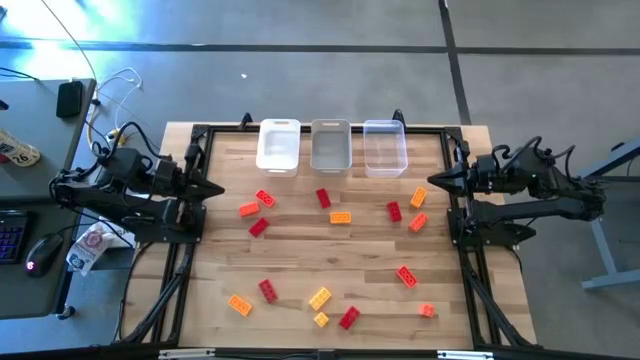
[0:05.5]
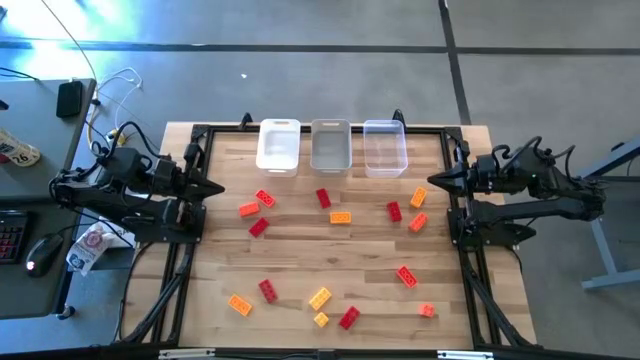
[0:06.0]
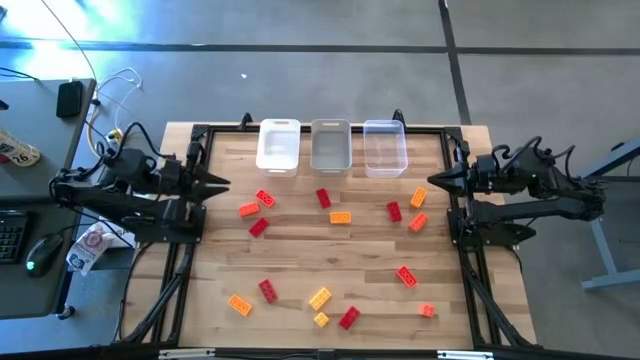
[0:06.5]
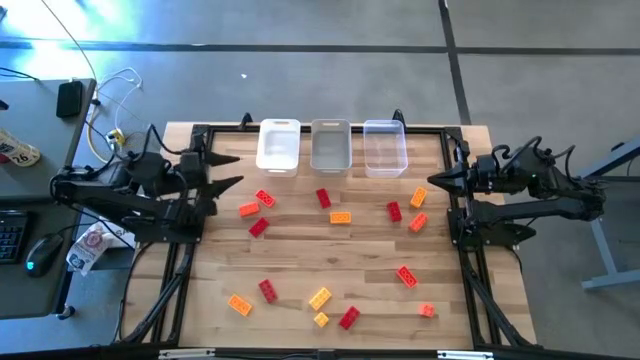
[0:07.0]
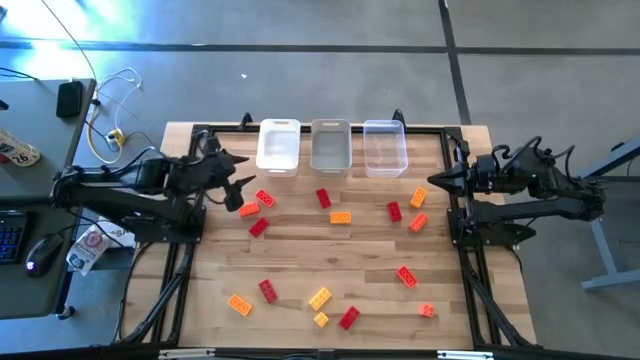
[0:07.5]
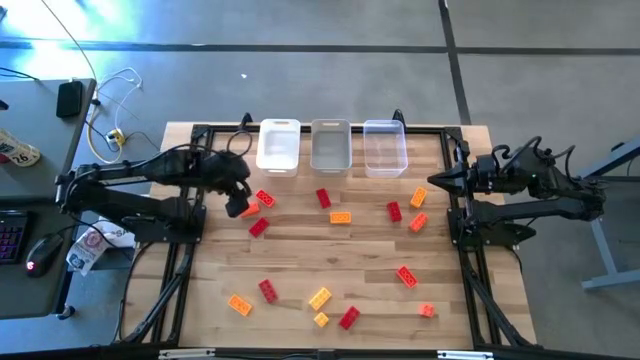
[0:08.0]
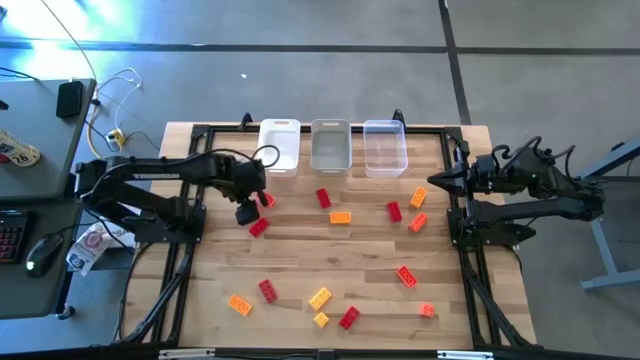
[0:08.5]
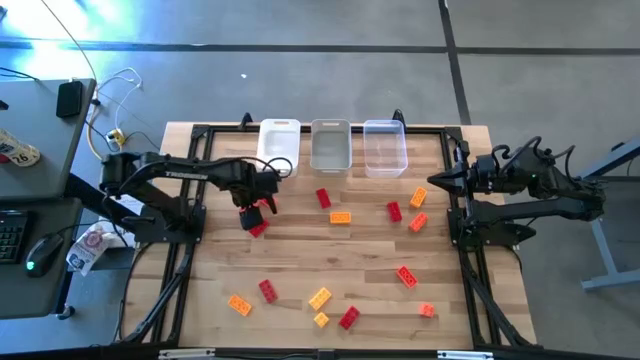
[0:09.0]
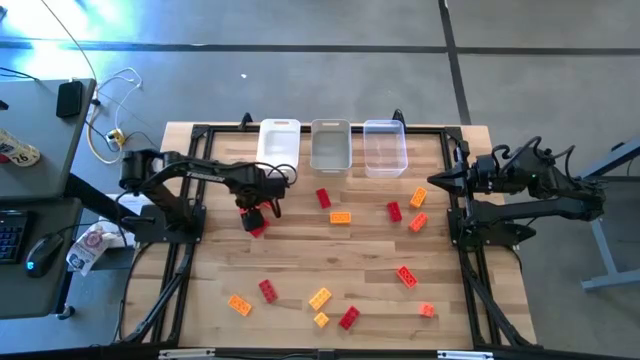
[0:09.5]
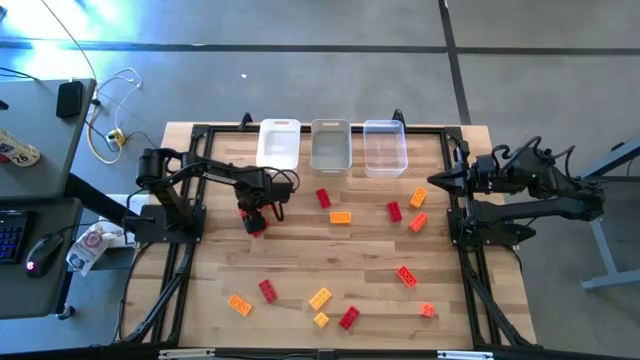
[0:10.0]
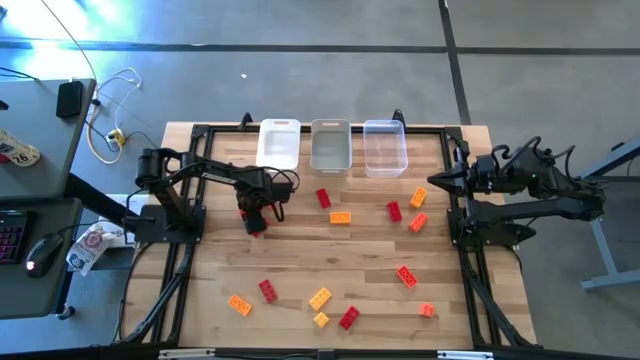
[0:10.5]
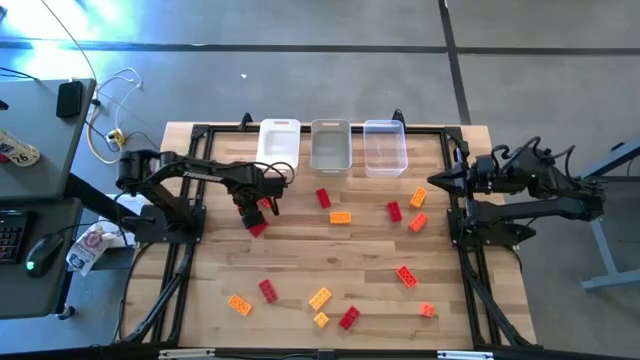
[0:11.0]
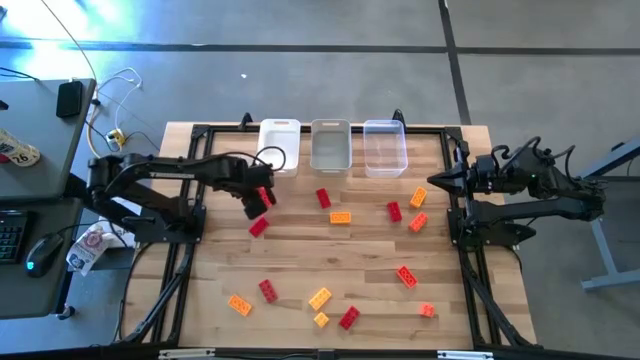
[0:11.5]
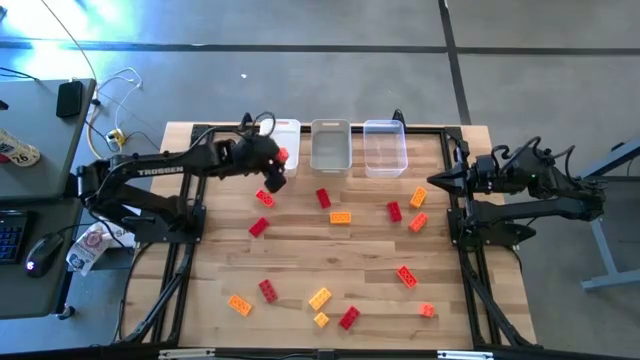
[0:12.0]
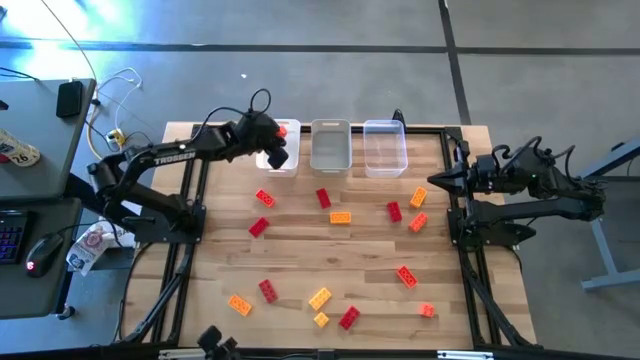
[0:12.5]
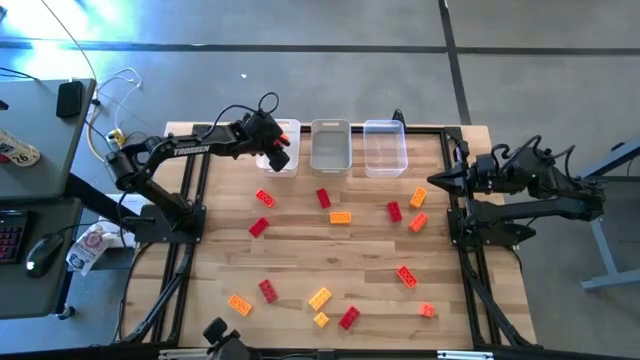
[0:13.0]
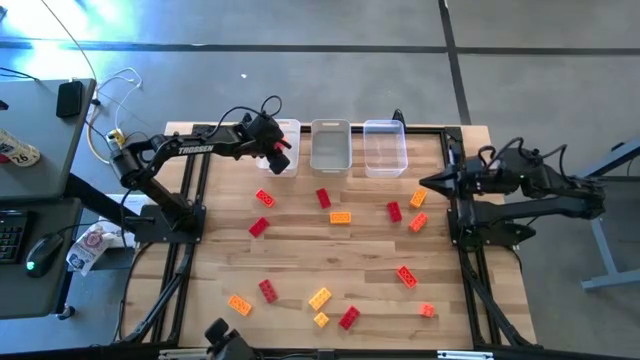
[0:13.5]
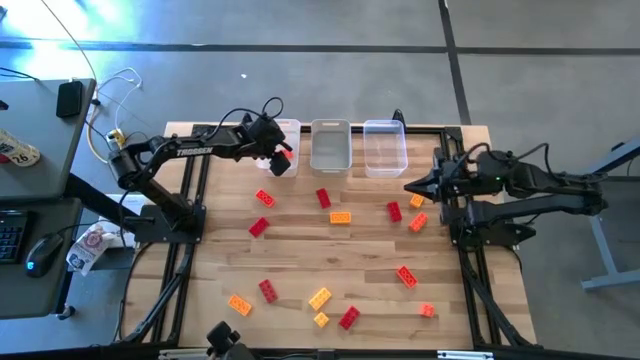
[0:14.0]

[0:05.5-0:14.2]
Task: Sort & place blocks by color
Put the orange game piece into the white bin

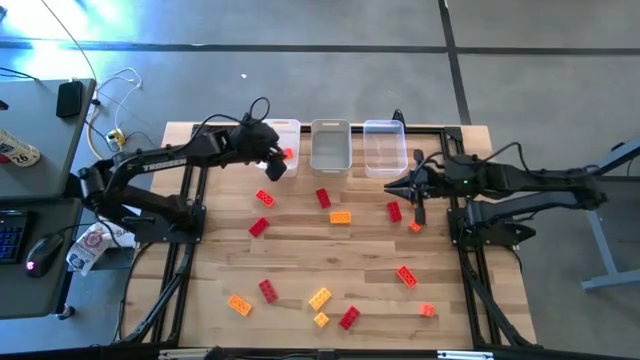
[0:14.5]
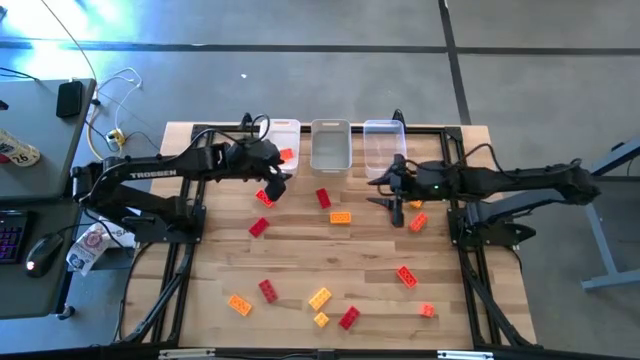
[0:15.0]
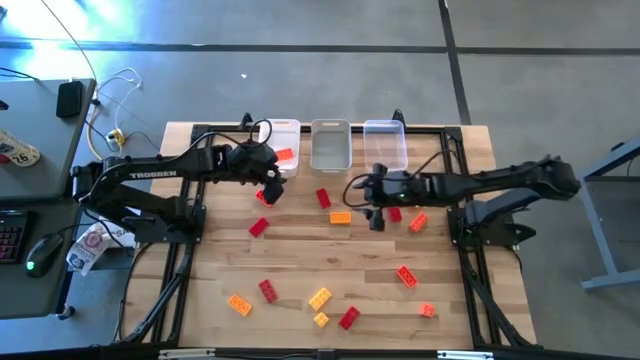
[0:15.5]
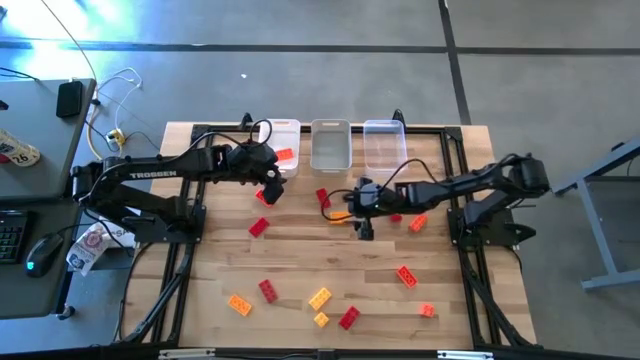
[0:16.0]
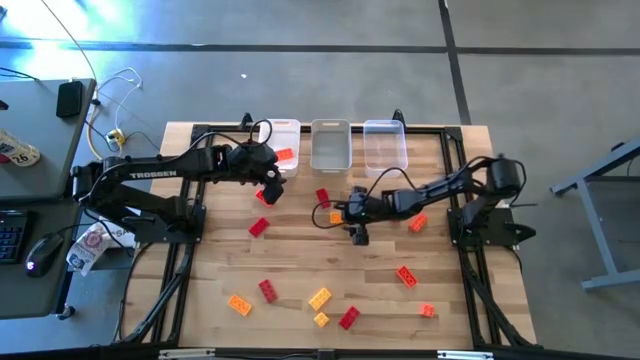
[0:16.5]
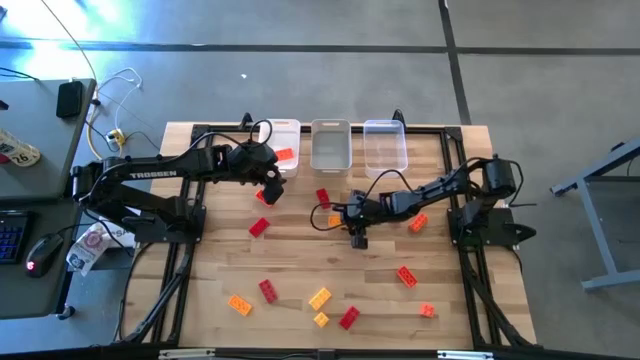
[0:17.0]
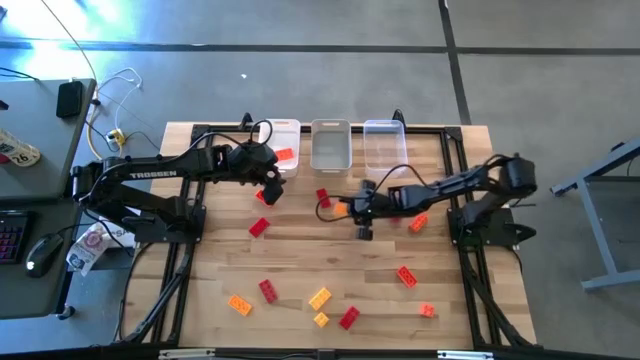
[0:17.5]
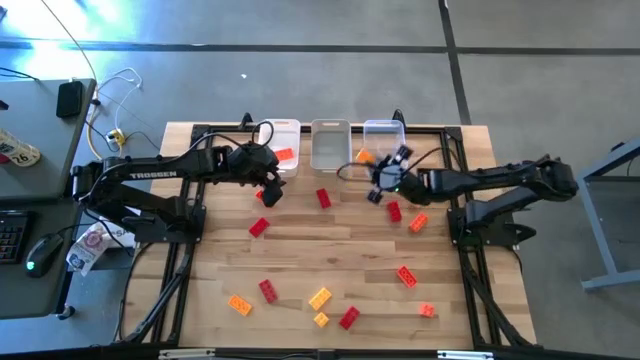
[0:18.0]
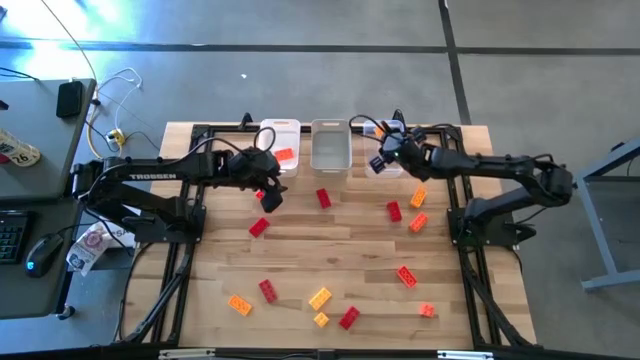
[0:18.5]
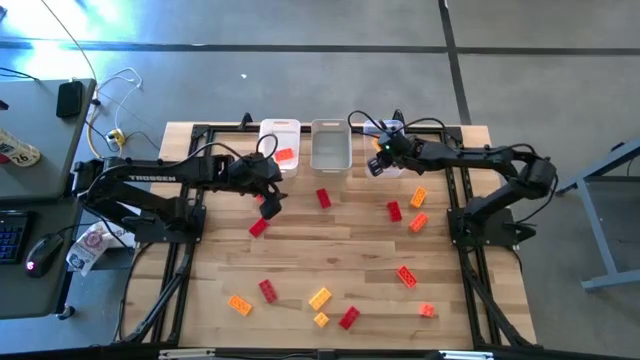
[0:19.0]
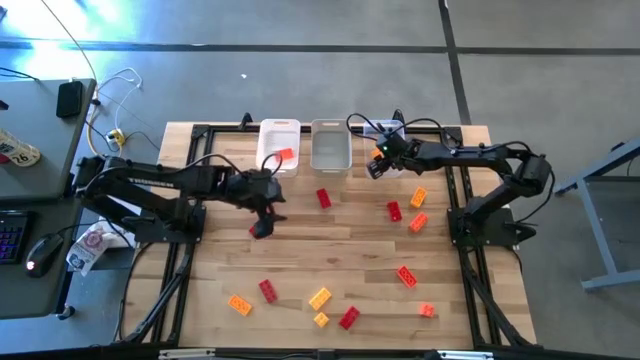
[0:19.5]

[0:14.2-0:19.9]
Put the yellow game piece into the transparent bin

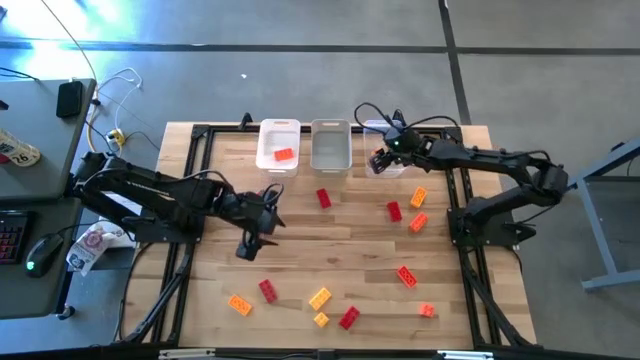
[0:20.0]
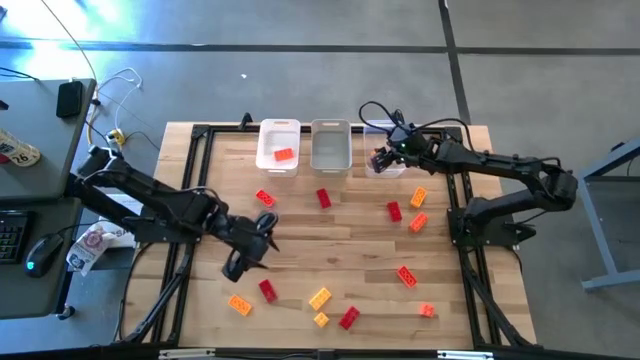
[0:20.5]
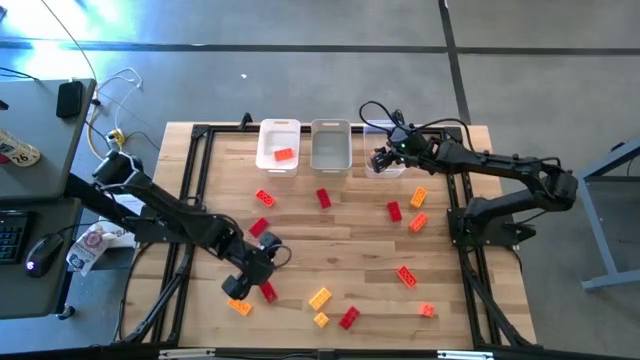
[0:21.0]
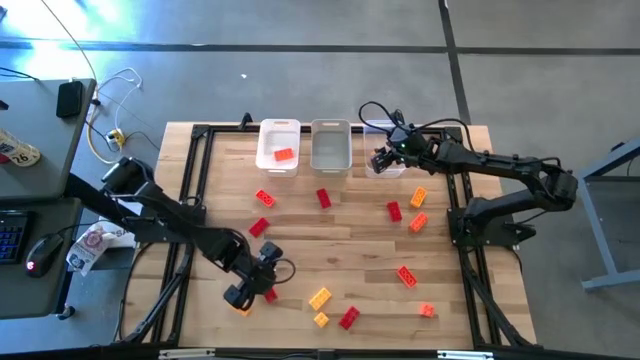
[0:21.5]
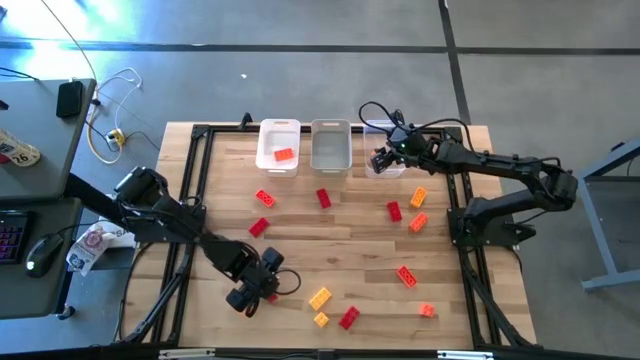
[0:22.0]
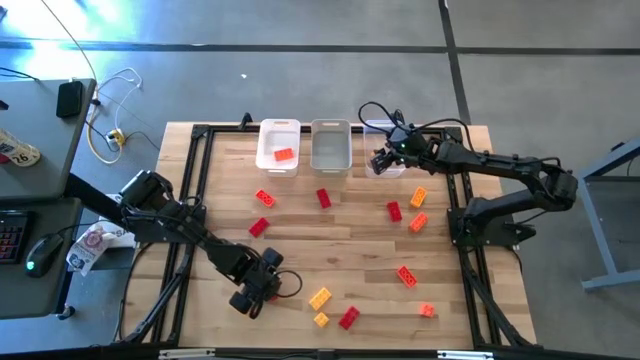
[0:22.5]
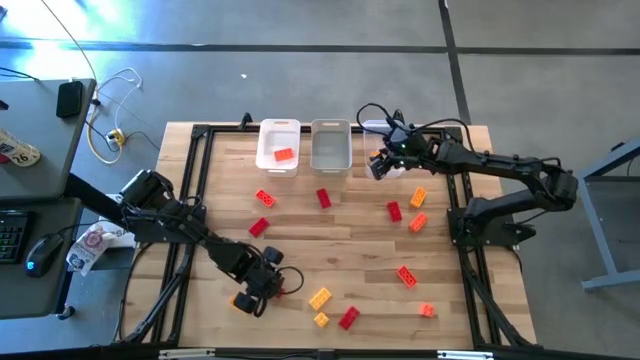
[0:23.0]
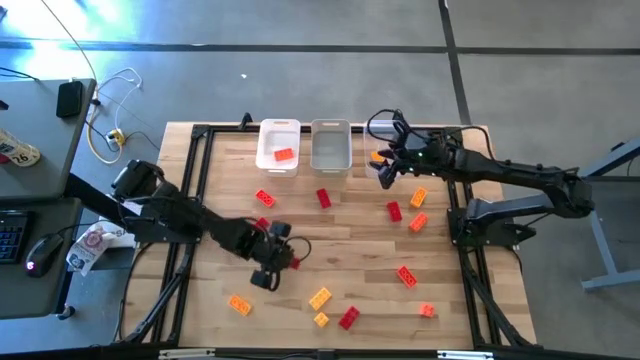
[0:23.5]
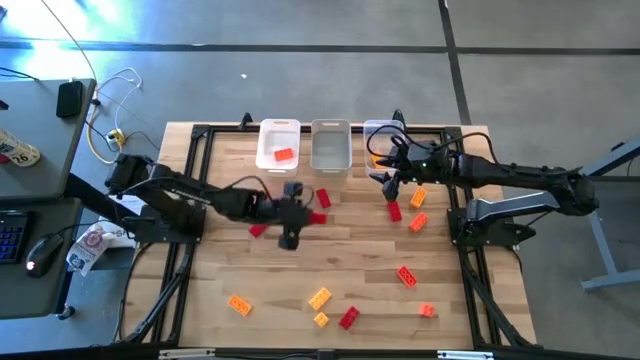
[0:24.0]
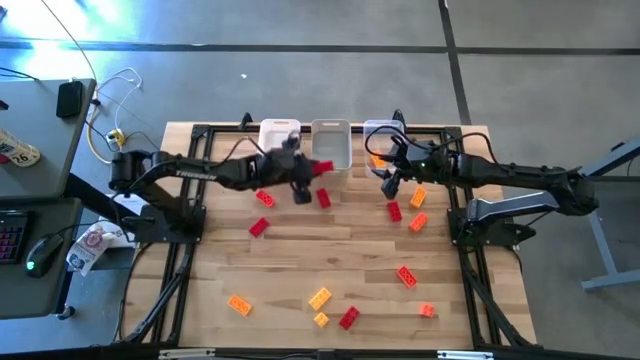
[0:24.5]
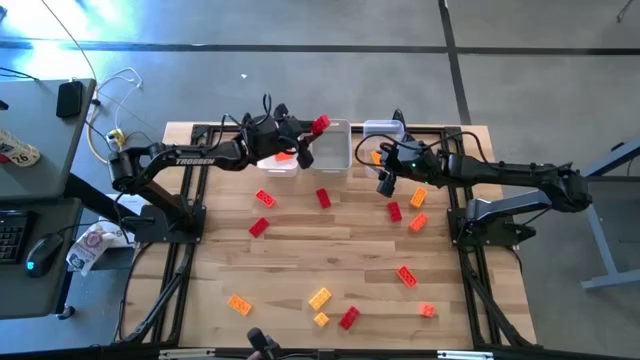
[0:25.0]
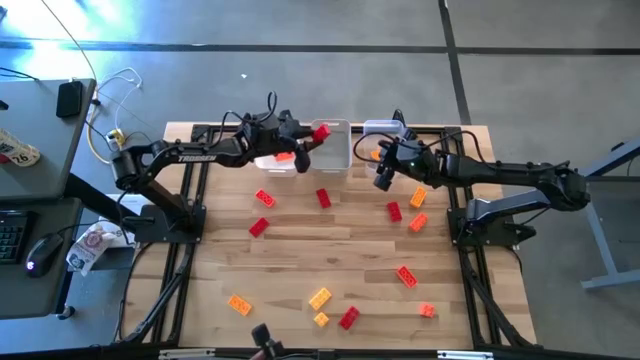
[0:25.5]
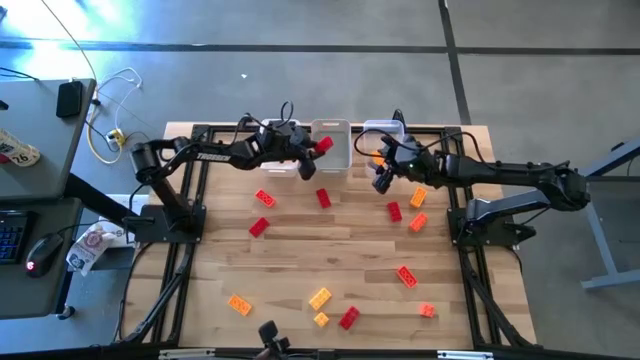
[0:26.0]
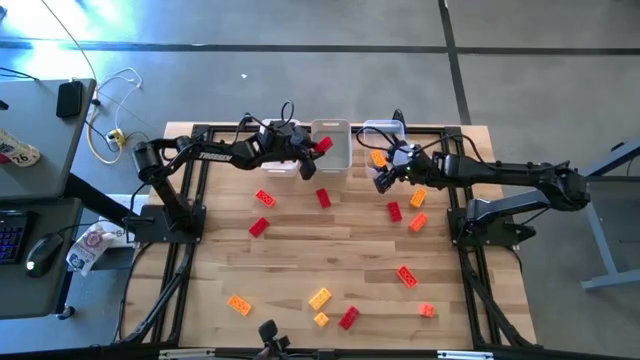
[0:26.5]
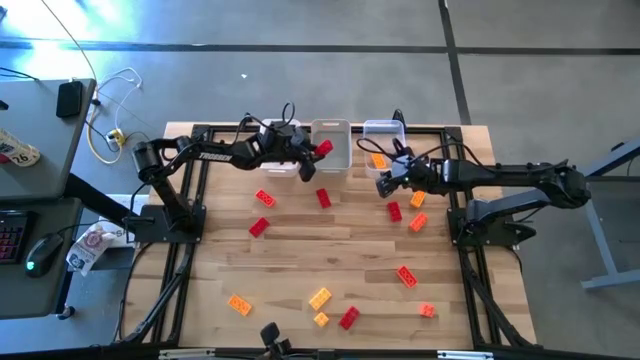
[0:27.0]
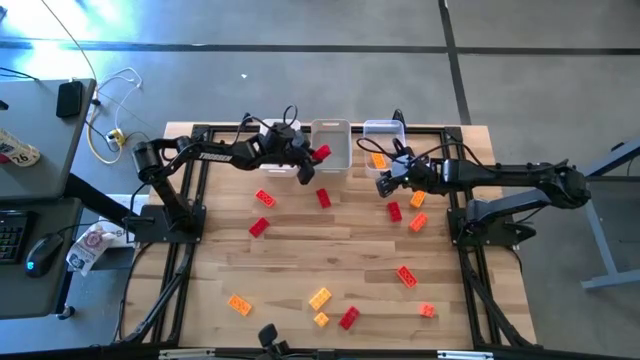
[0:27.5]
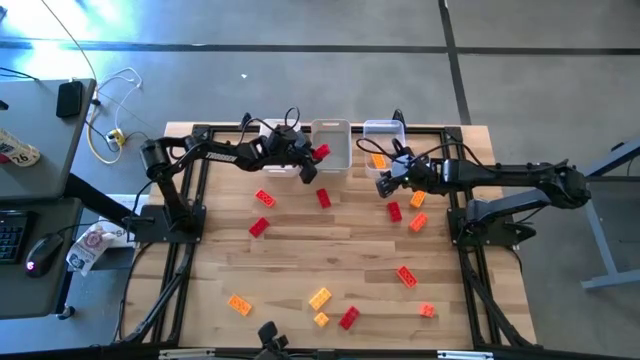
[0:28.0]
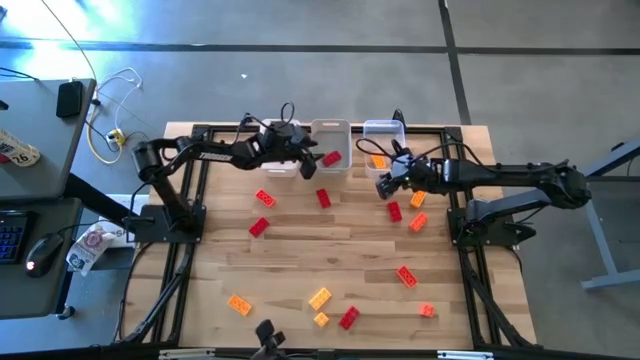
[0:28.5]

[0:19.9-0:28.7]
Put the red game piece into the gray bin
